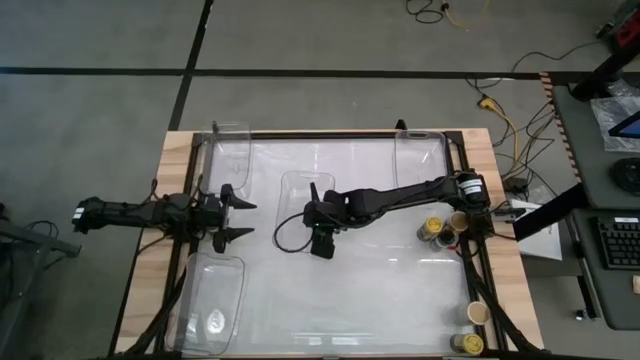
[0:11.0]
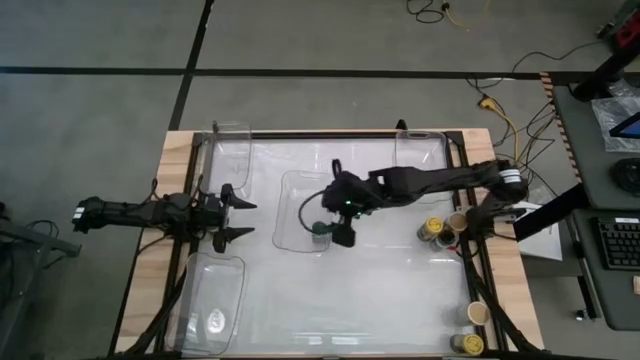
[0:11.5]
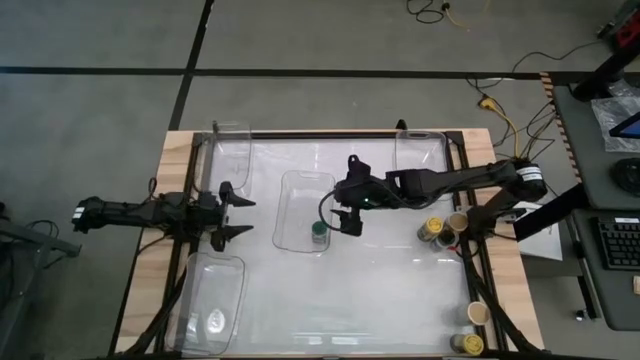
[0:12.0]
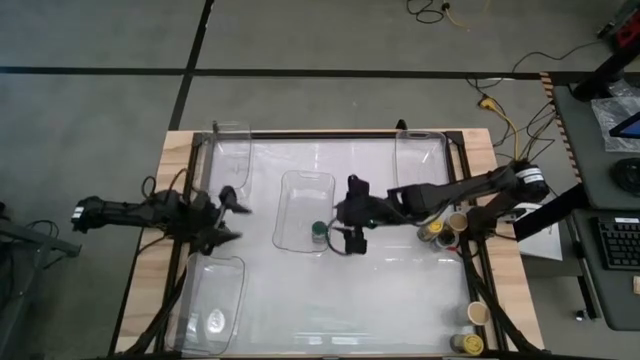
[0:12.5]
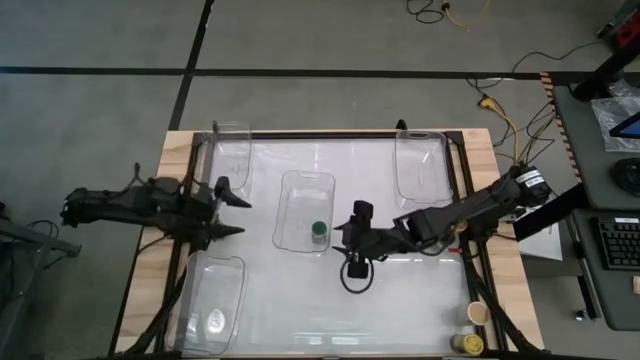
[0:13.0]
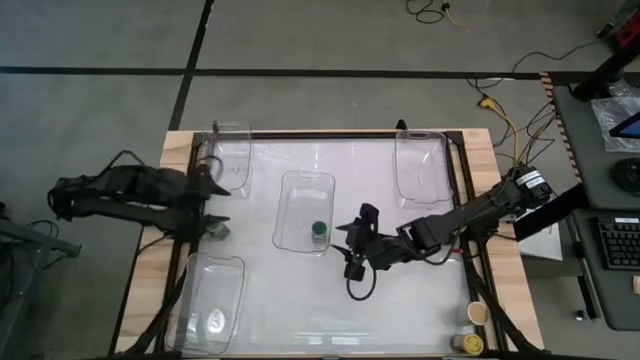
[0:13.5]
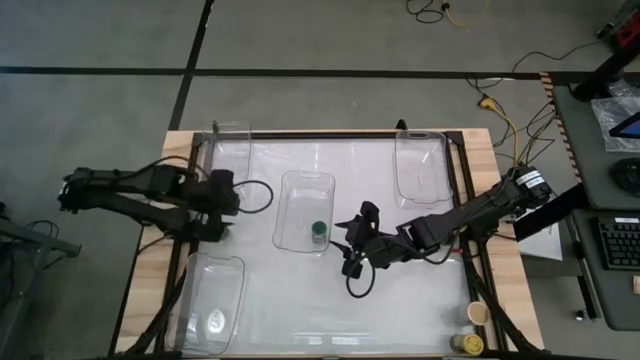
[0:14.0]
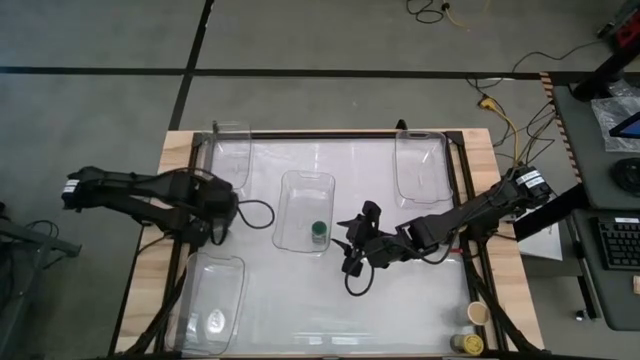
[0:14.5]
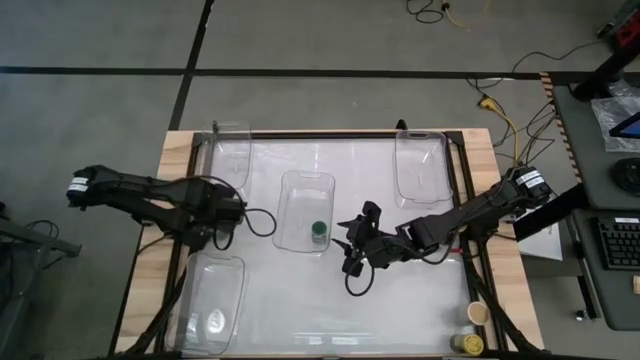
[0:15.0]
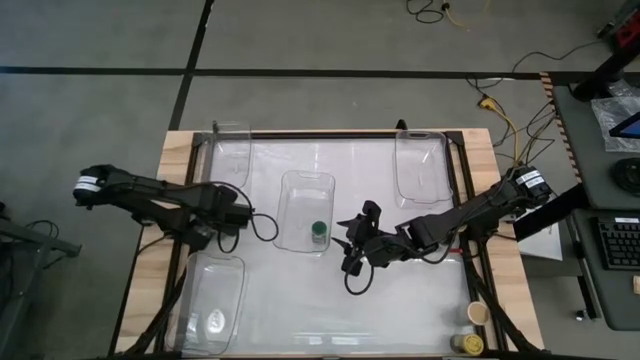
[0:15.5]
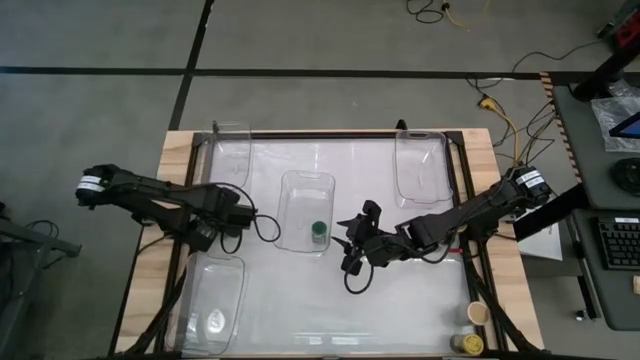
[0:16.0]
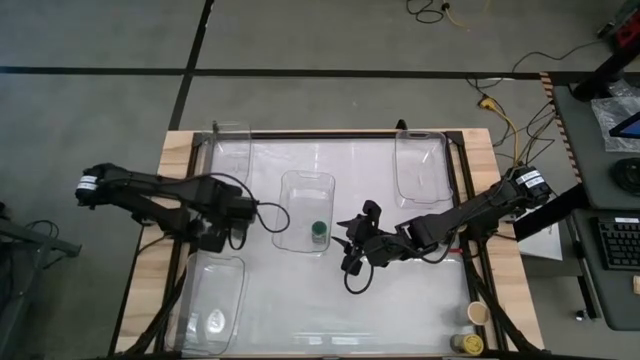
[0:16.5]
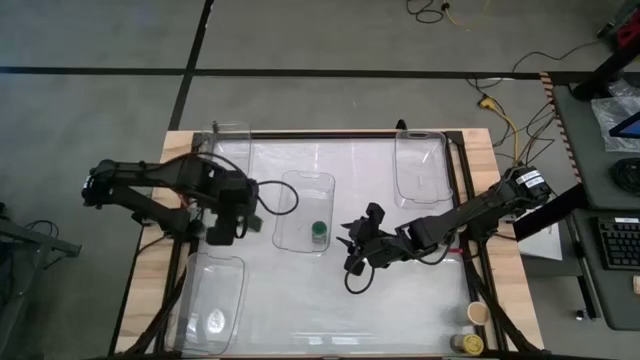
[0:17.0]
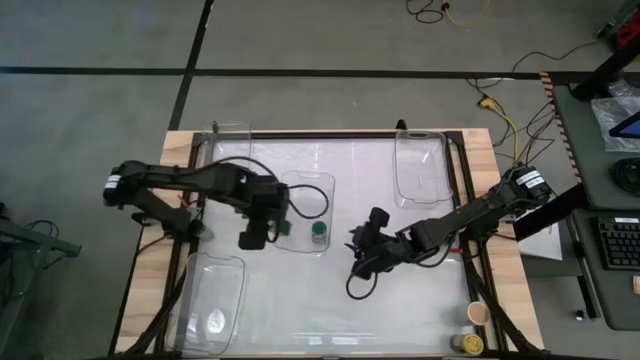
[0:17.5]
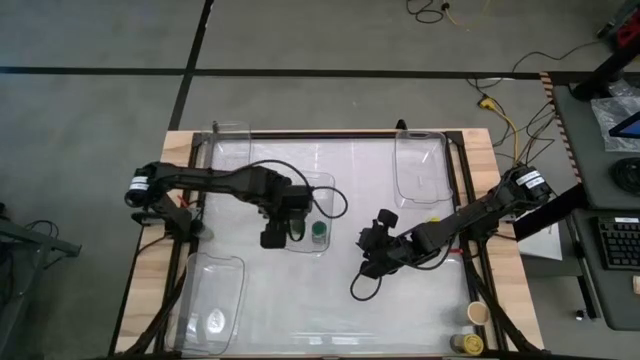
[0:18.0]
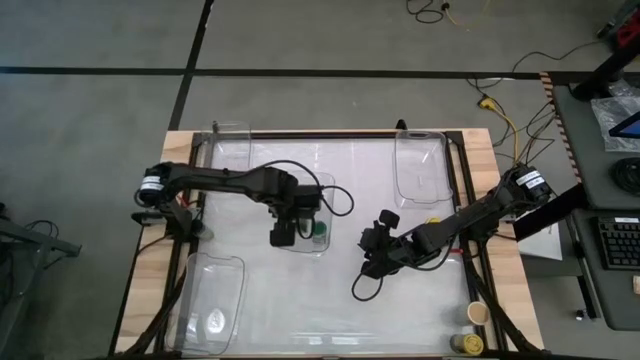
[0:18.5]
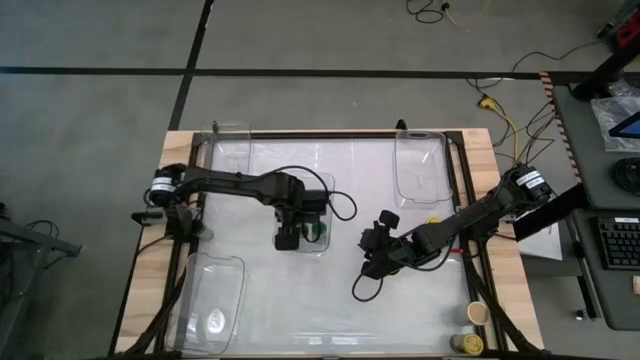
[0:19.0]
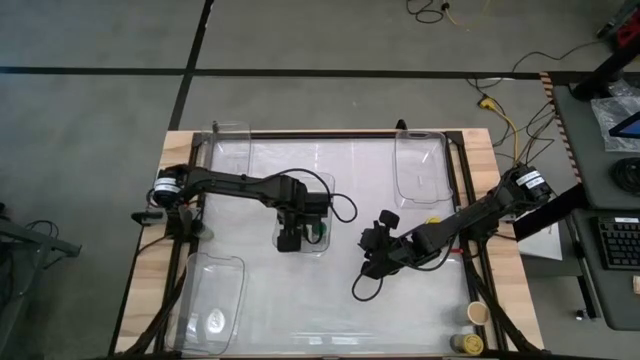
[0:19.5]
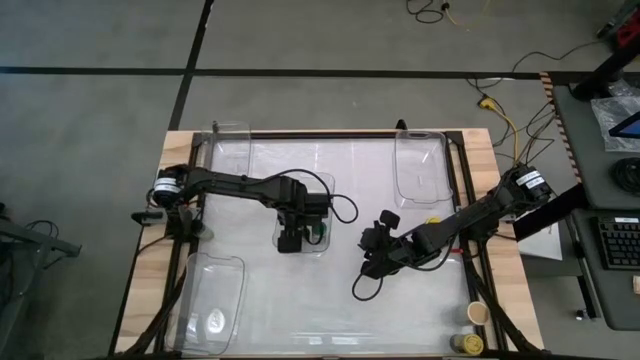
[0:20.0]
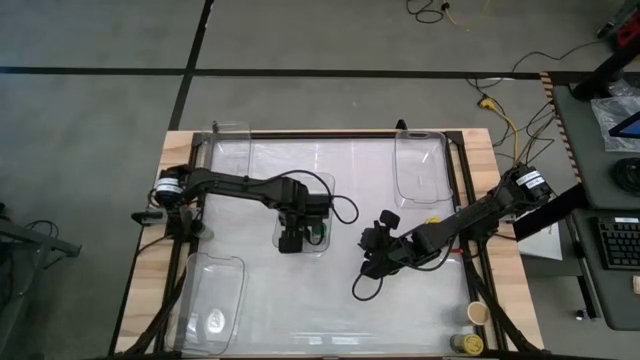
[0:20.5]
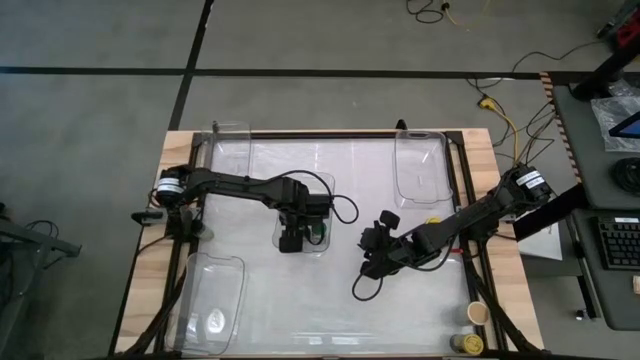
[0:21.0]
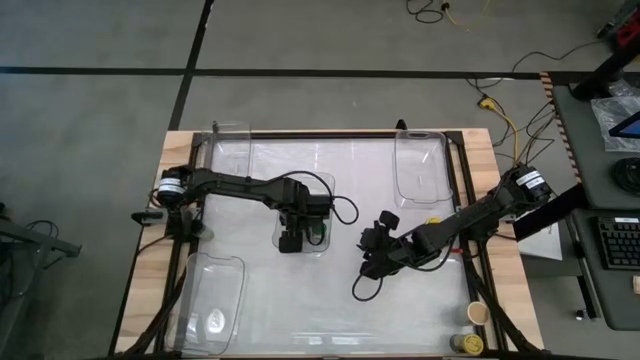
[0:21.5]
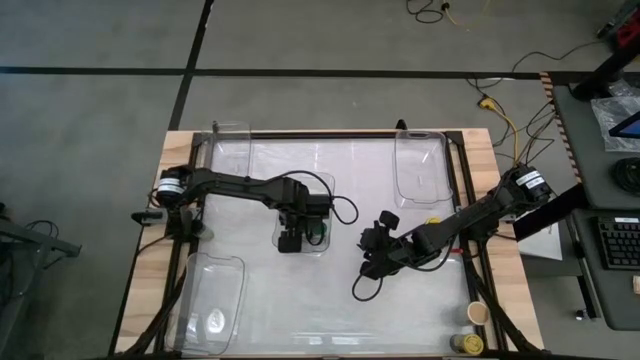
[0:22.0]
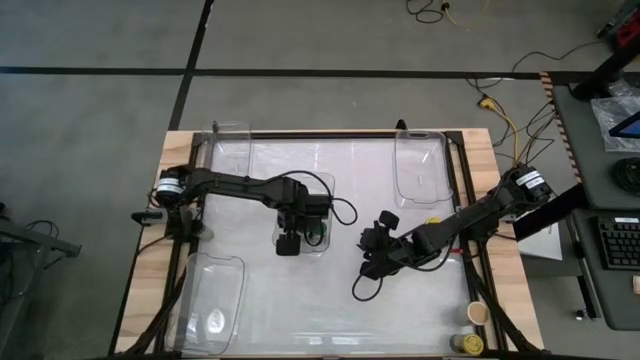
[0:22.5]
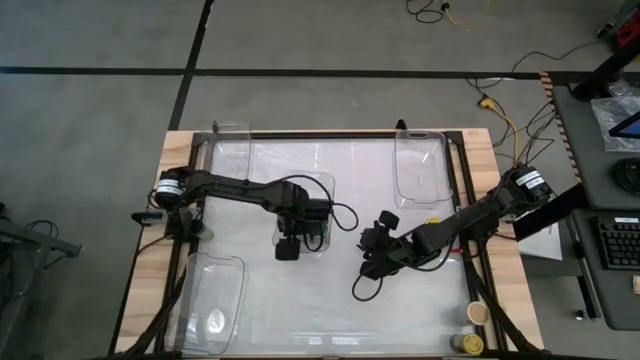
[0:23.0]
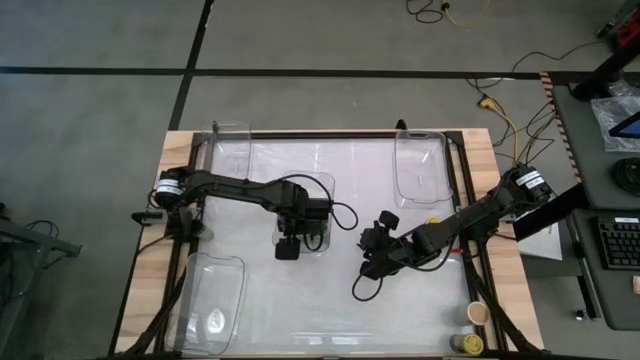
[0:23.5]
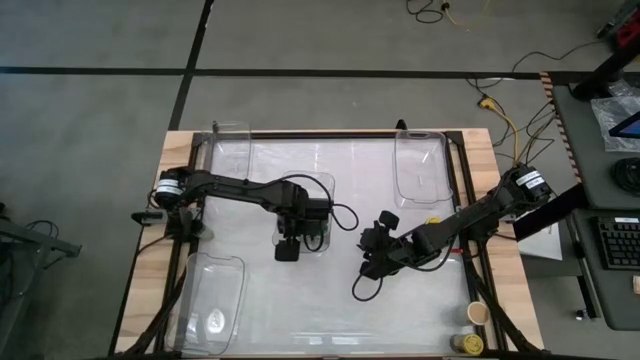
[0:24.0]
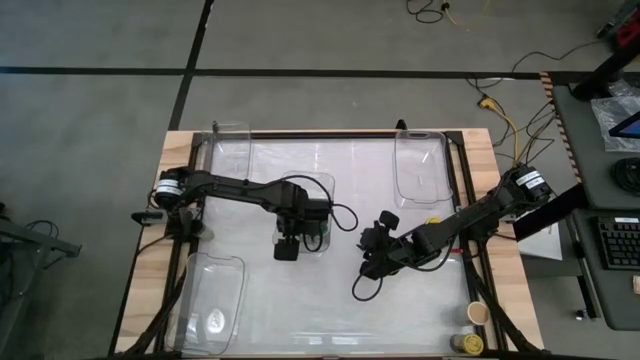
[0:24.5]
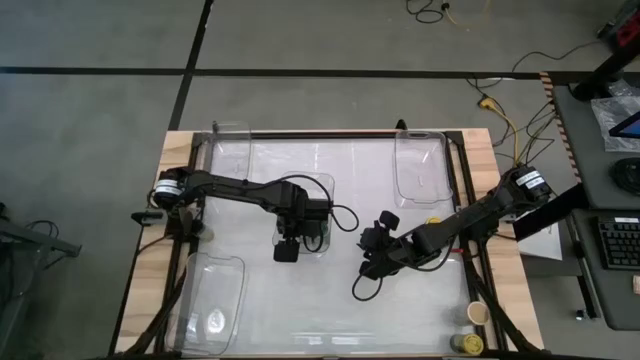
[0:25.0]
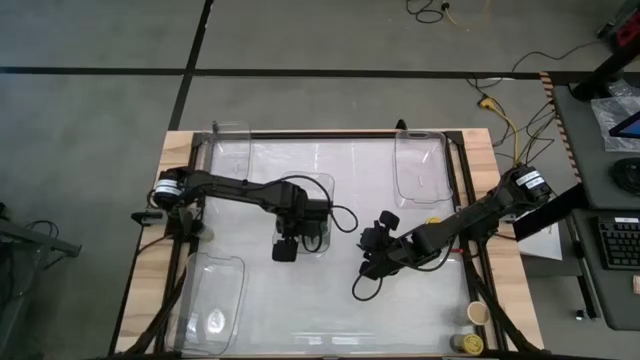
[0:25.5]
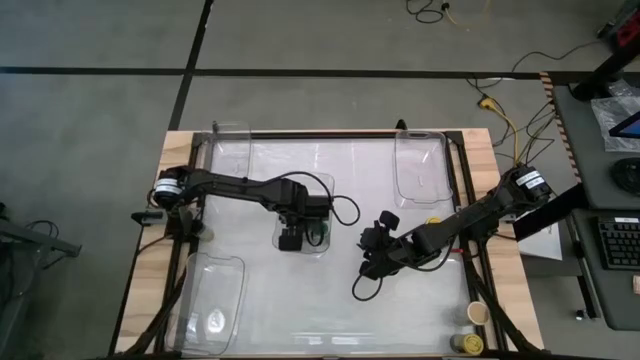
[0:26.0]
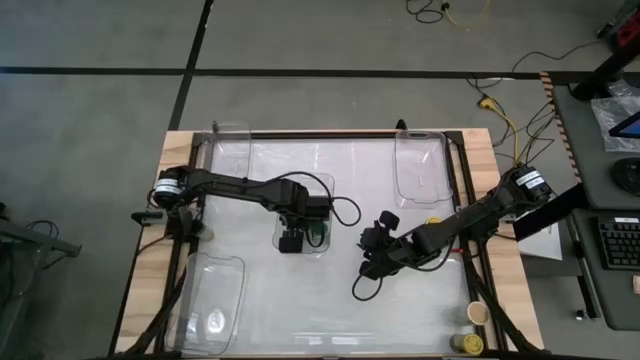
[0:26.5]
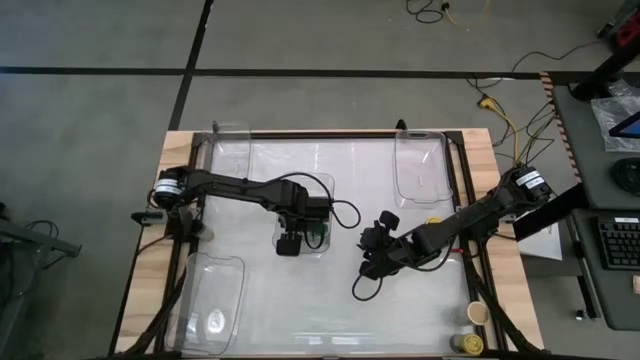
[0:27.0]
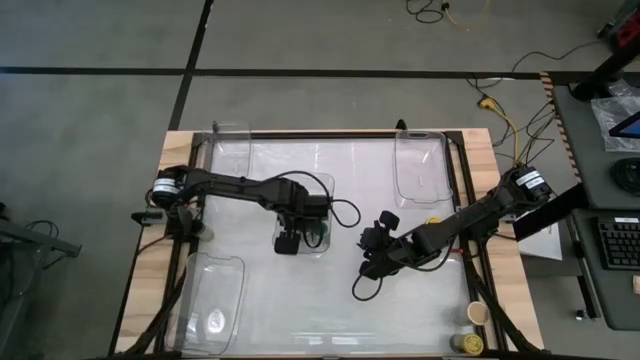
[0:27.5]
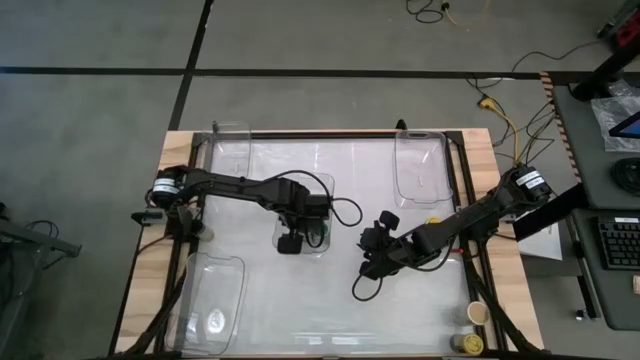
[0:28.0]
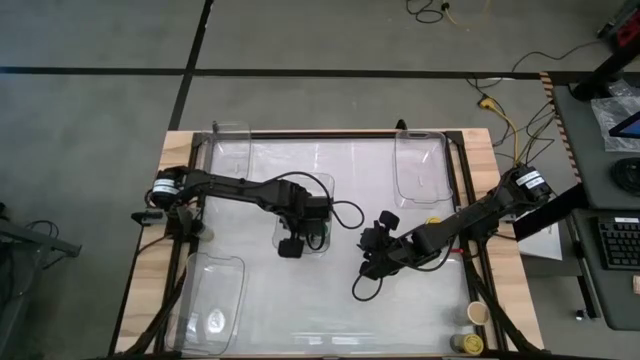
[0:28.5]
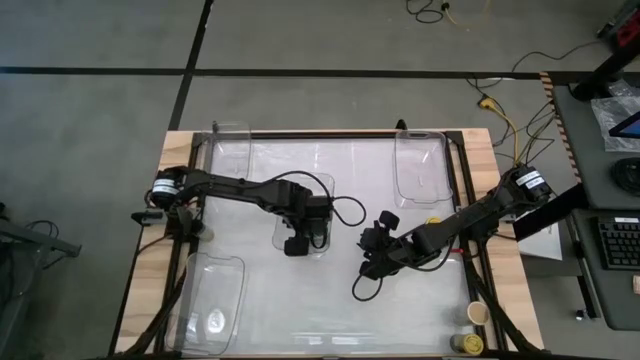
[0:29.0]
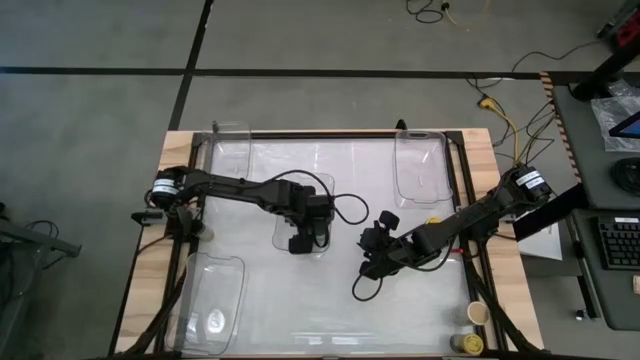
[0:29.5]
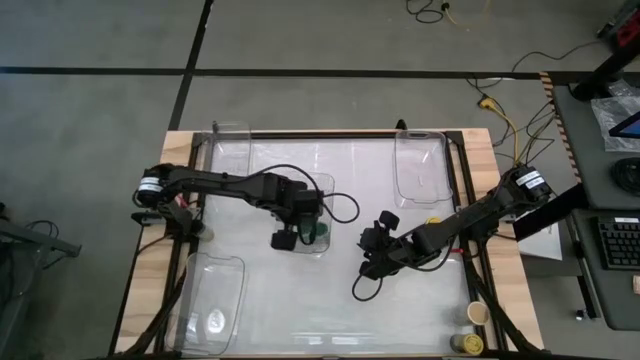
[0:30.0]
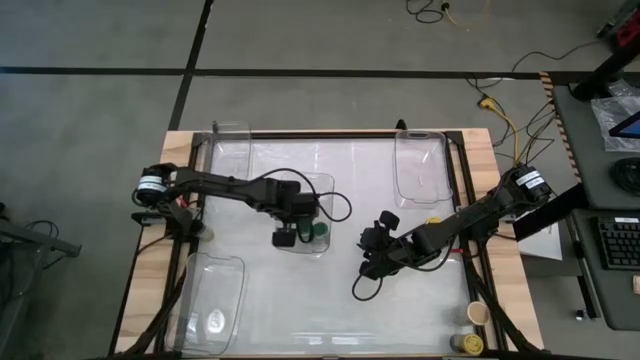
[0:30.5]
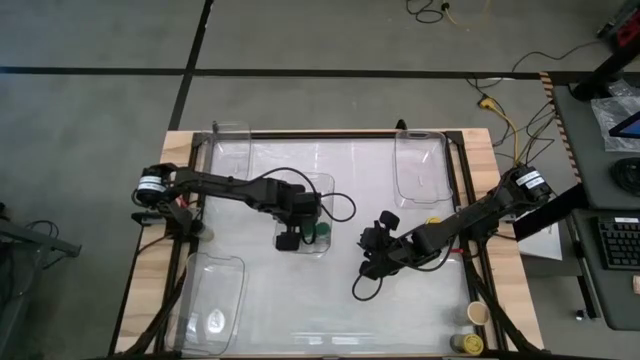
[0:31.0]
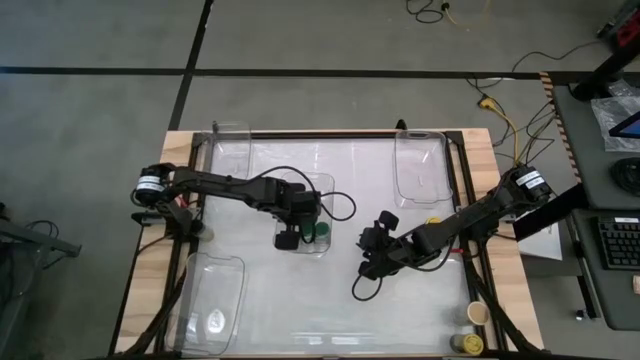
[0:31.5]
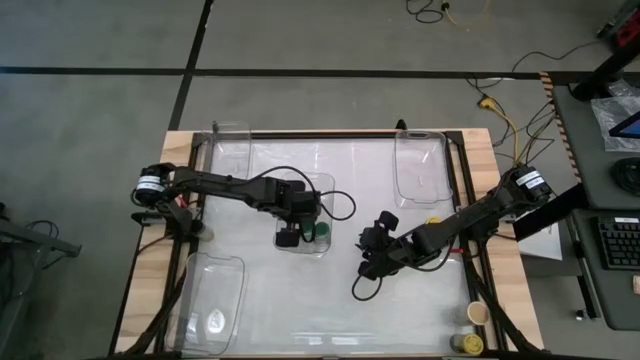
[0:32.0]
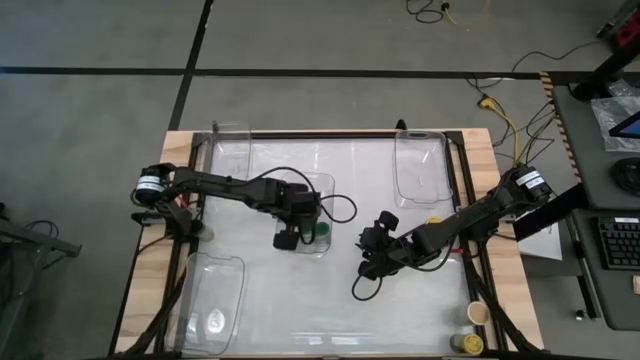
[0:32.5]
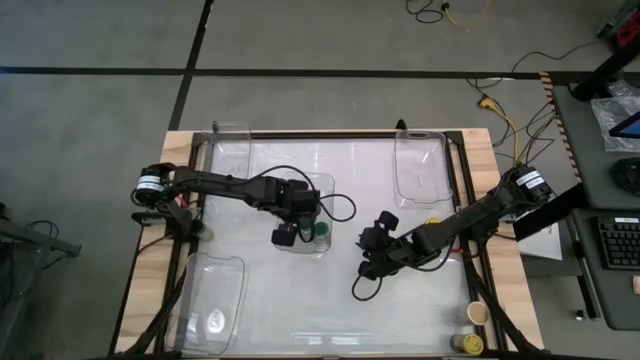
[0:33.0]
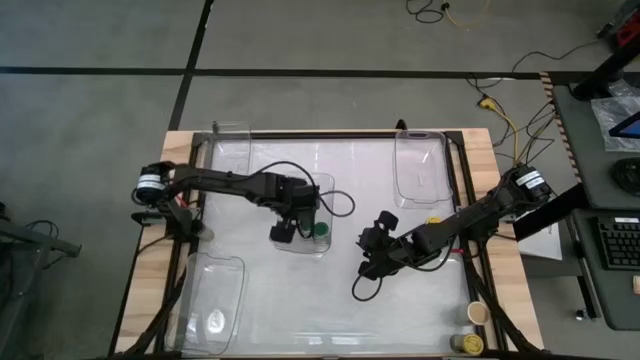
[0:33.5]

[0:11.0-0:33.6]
Task: Sort spices by type
Put the green seasoning bottle into the center transparent bin
